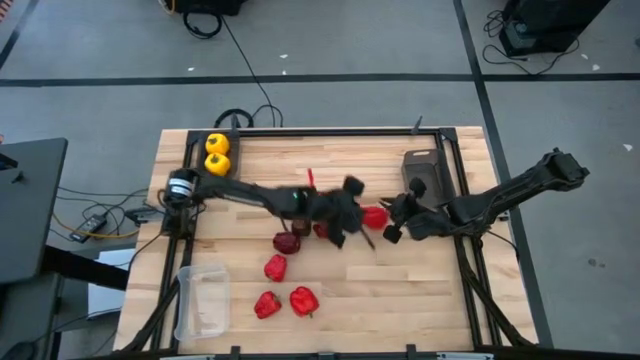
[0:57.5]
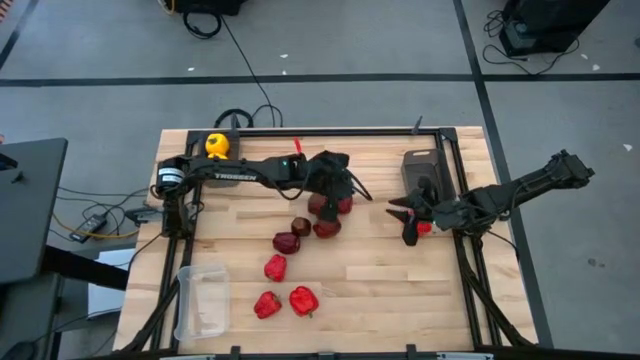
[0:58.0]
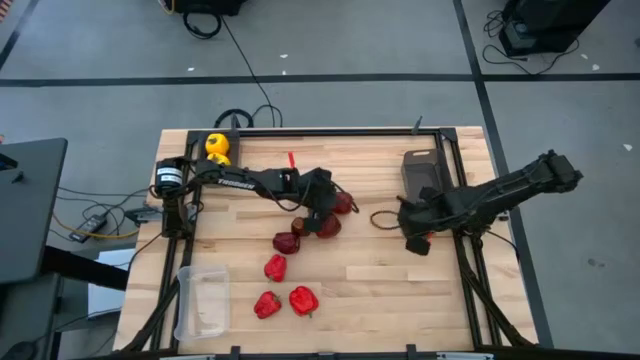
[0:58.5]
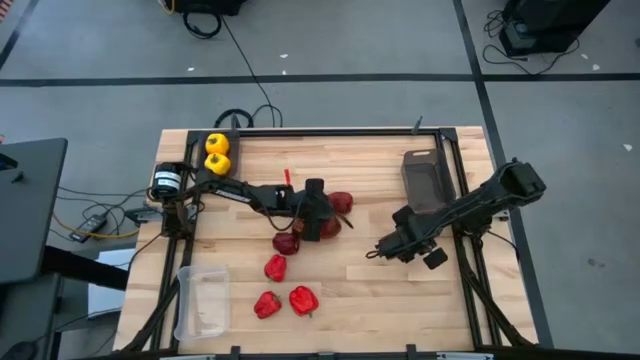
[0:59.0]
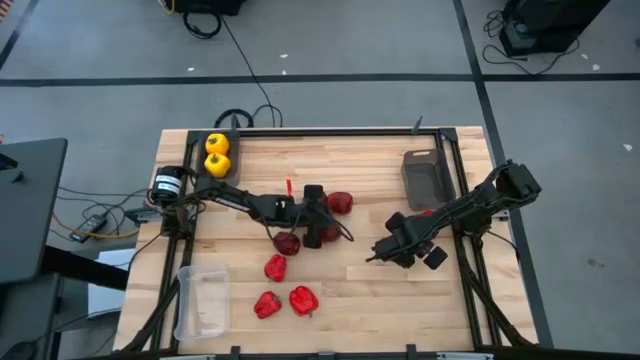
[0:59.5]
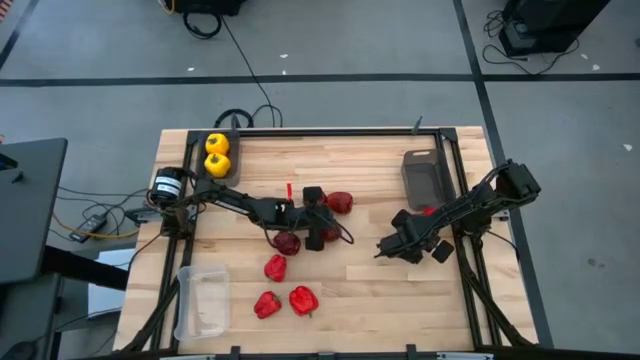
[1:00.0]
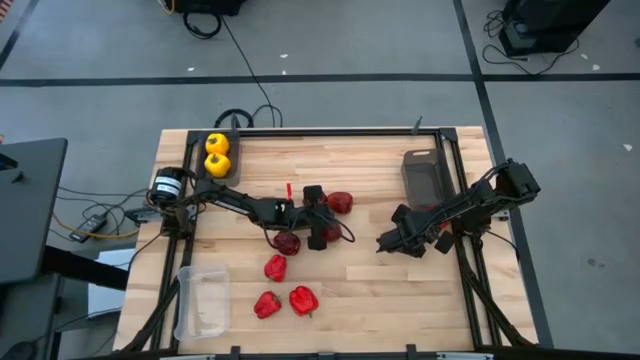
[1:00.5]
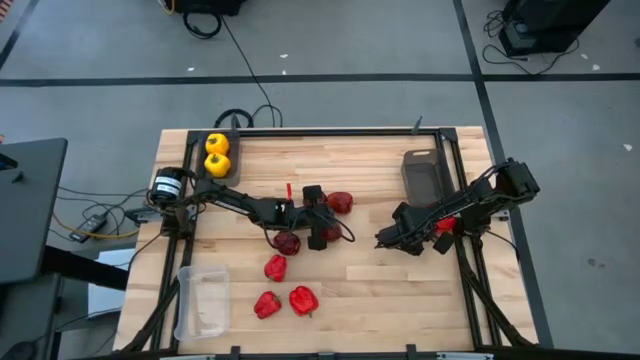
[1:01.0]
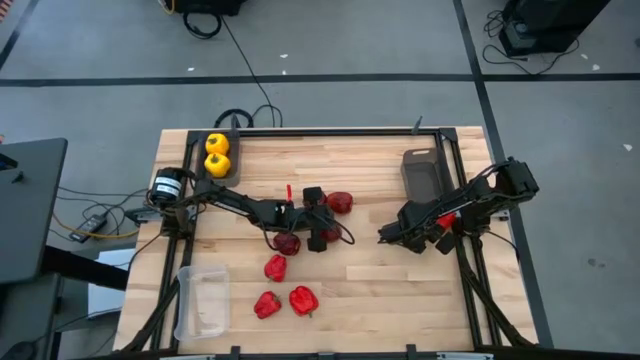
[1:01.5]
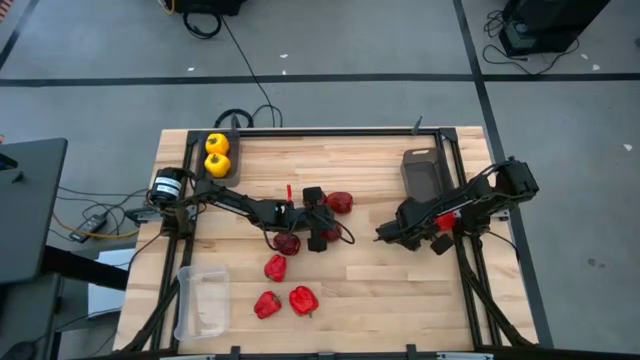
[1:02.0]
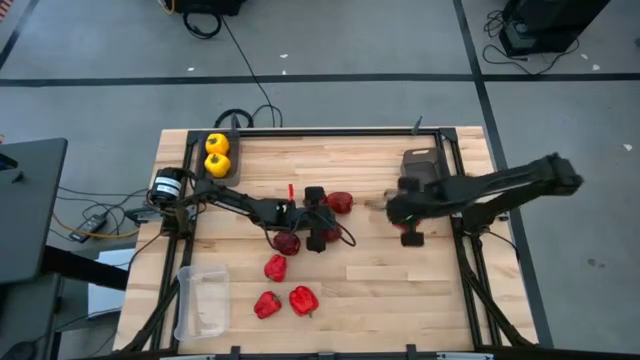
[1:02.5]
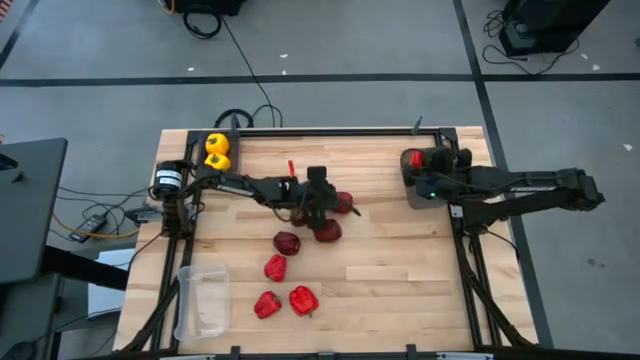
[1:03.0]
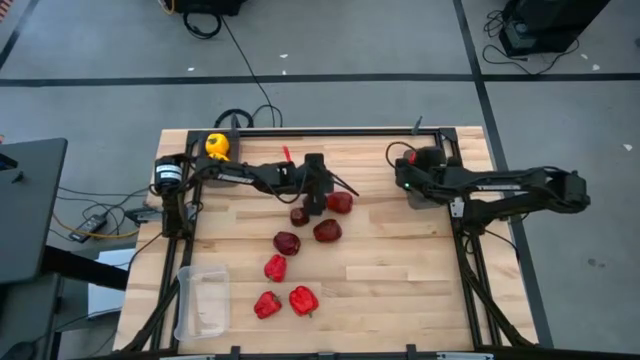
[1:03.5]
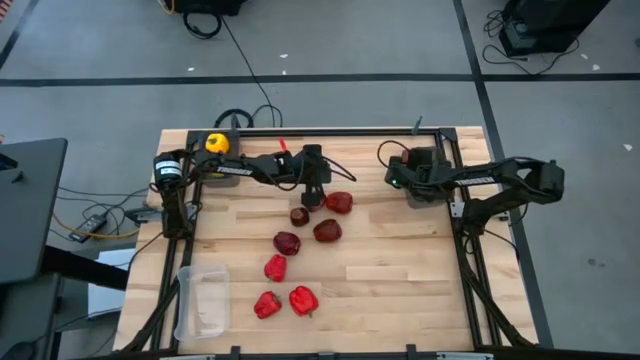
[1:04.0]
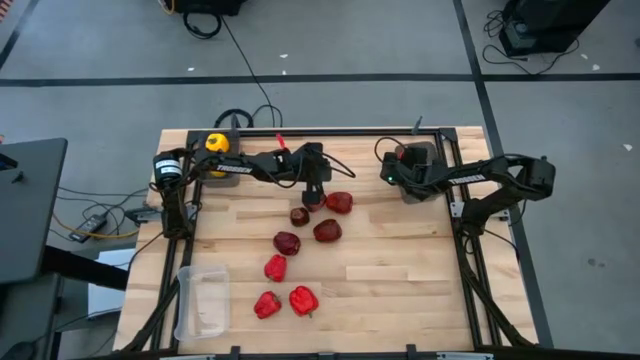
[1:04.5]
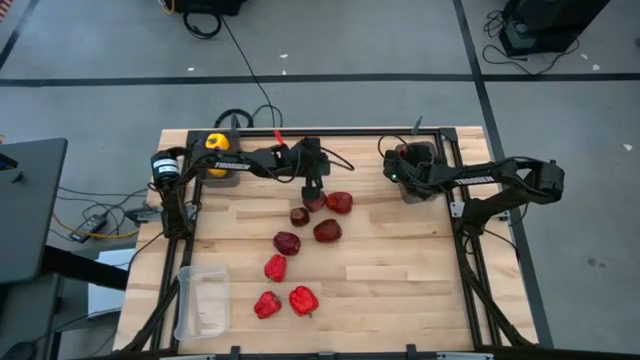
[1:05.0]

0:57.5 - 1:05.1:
Task: Sort produce into baskets
Put the red bell pepper into the right black transparent bin

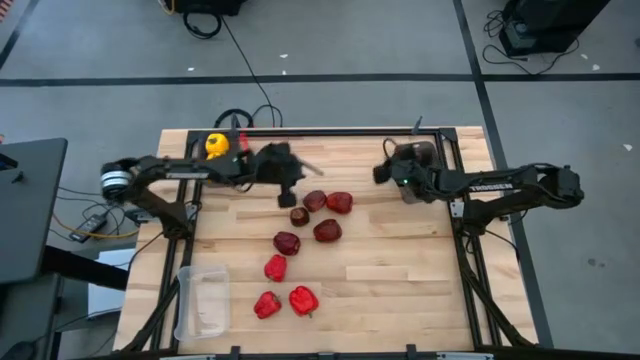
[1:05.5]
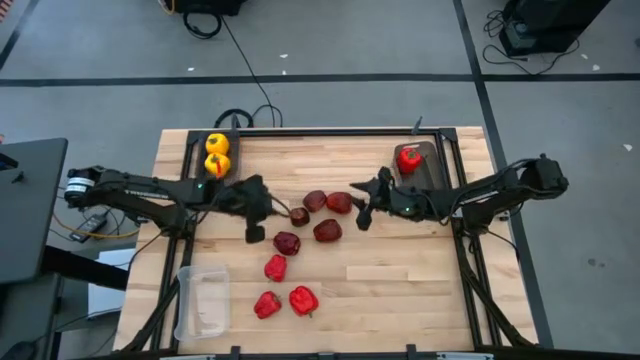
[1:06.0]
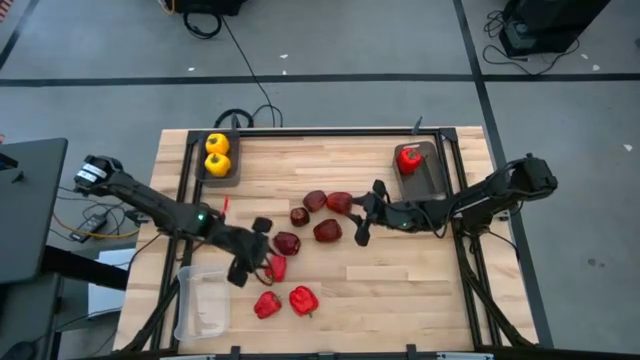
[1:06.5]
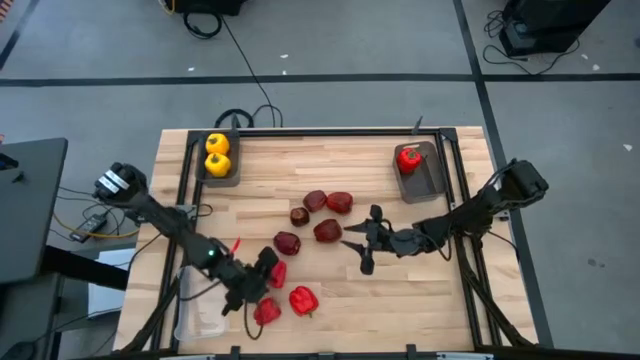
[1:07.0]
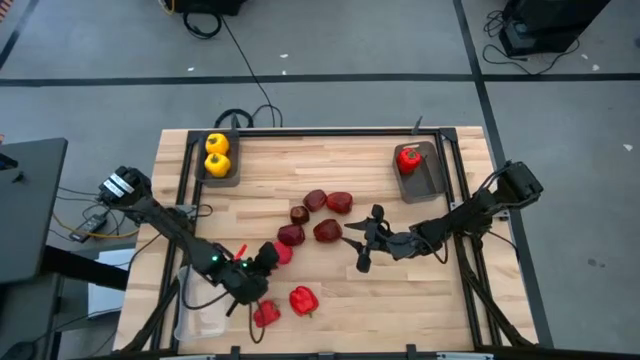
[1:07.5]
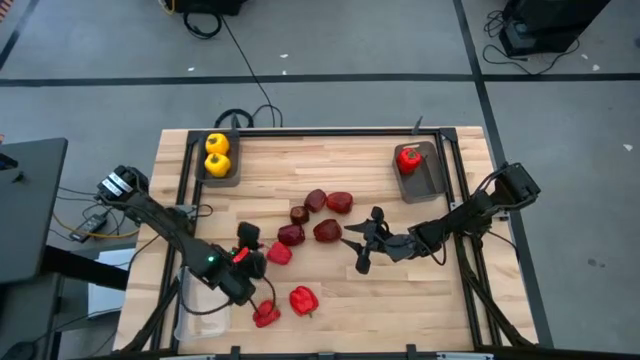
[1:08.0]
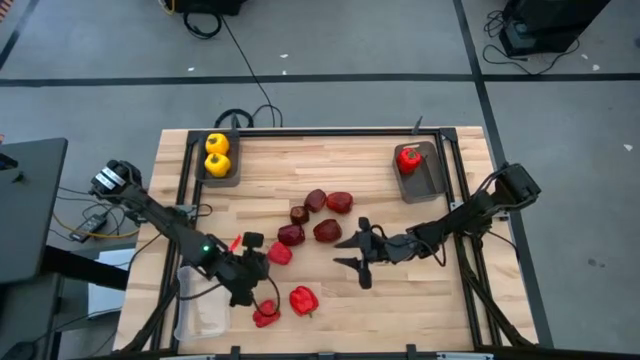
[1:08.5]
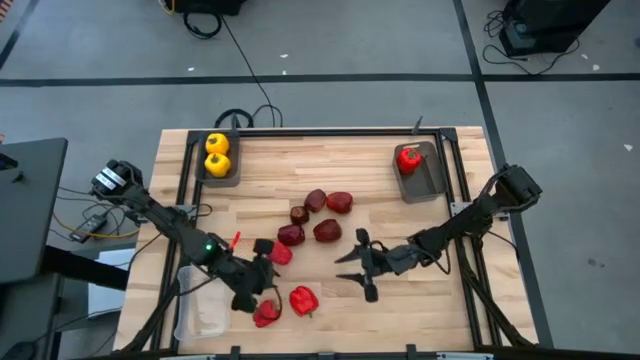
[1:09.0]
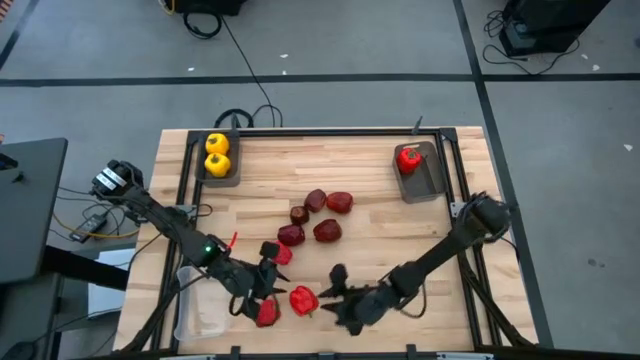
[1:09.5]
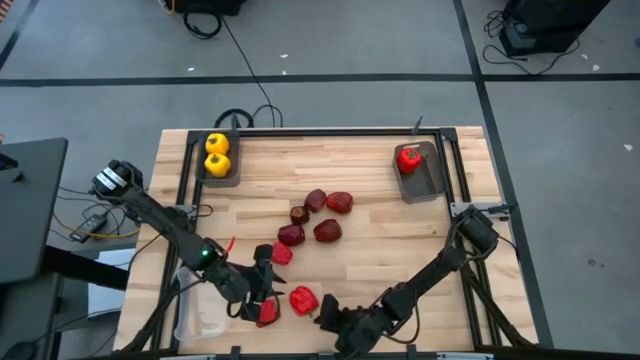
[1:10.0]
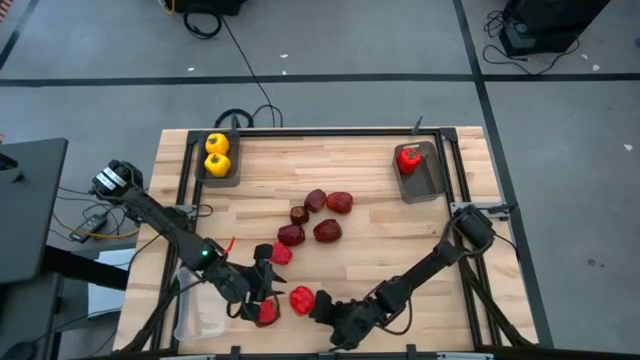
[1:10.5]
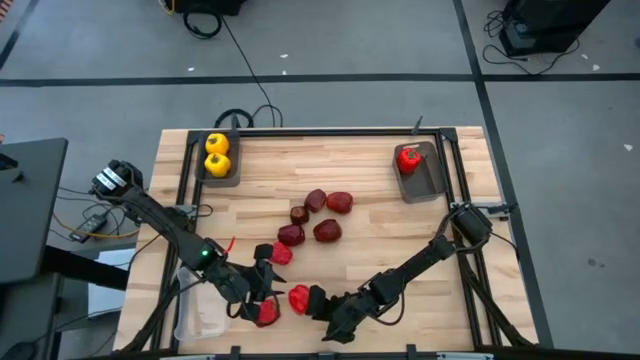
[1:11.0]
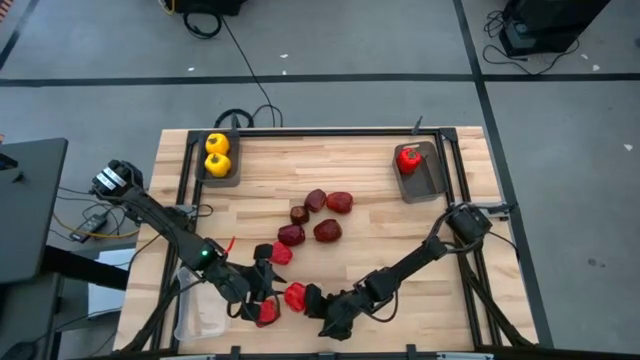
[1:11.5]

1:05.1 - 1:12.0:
Put the red bell pepper into the right black transparent bin

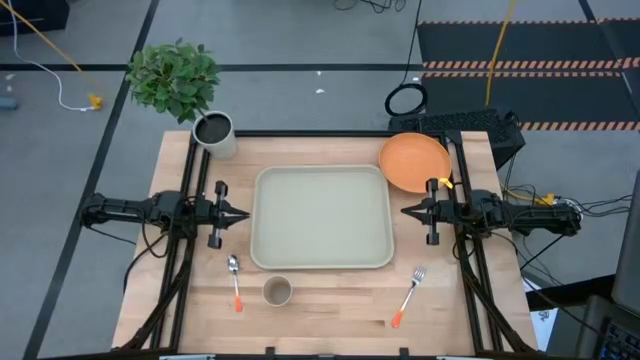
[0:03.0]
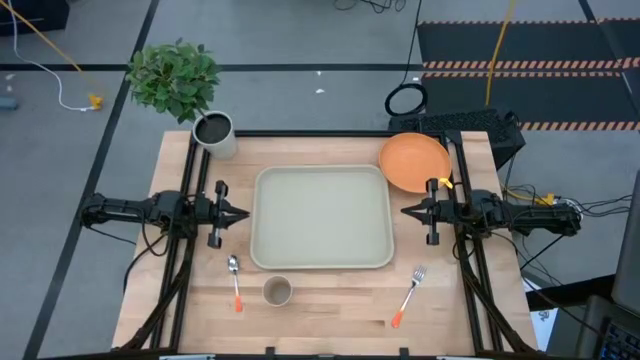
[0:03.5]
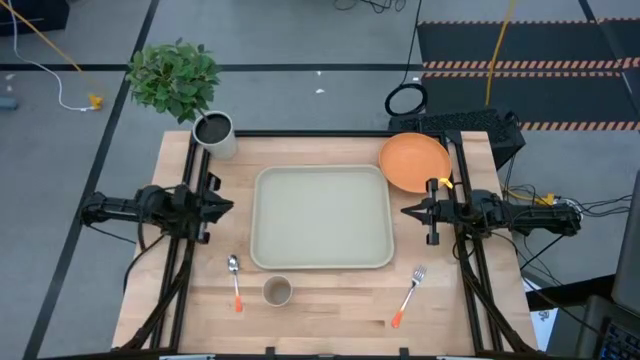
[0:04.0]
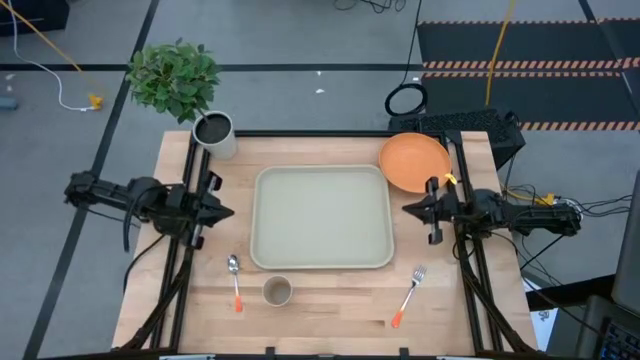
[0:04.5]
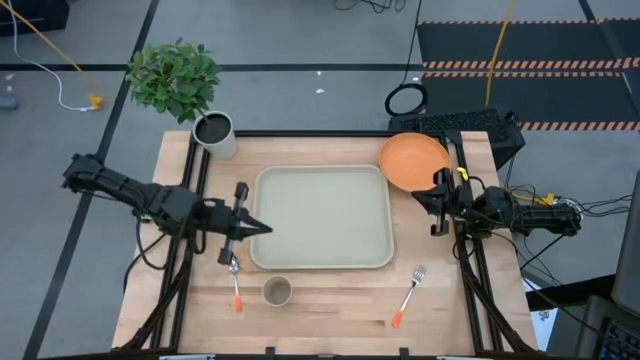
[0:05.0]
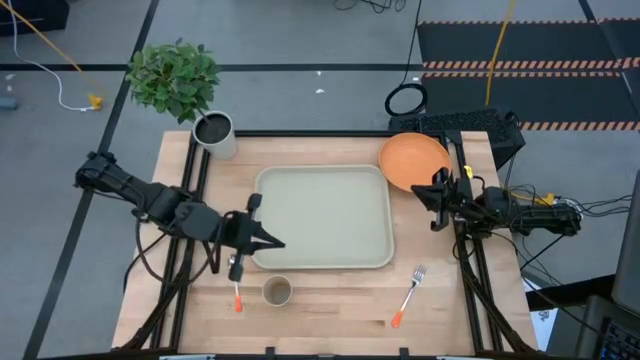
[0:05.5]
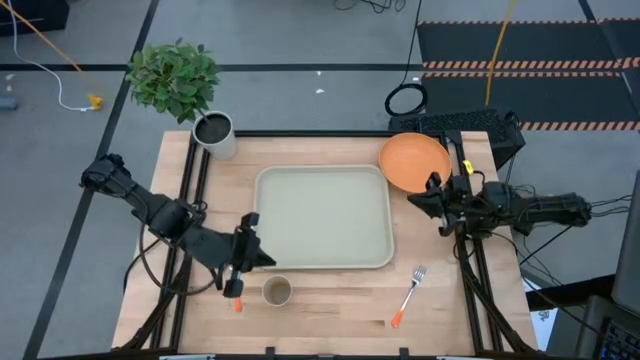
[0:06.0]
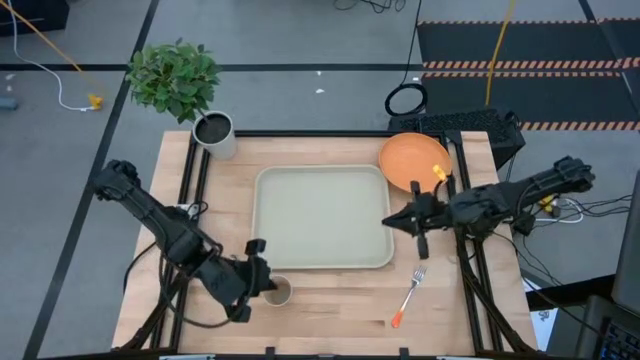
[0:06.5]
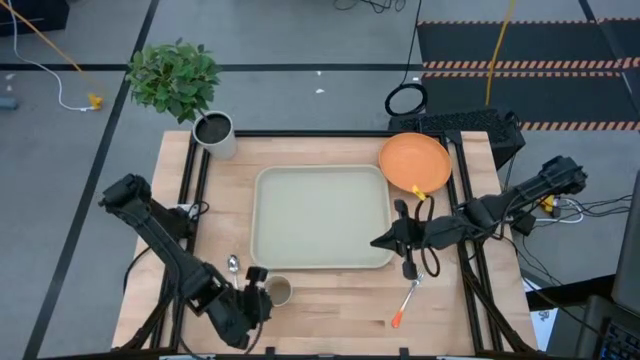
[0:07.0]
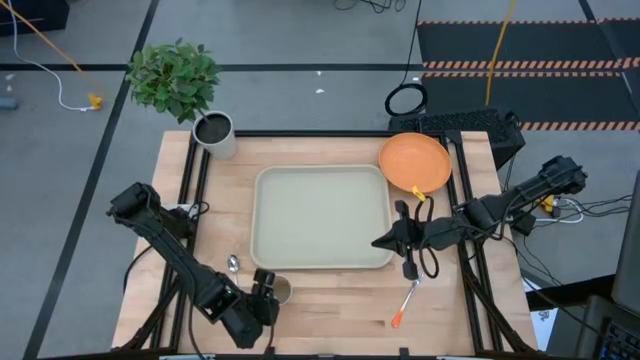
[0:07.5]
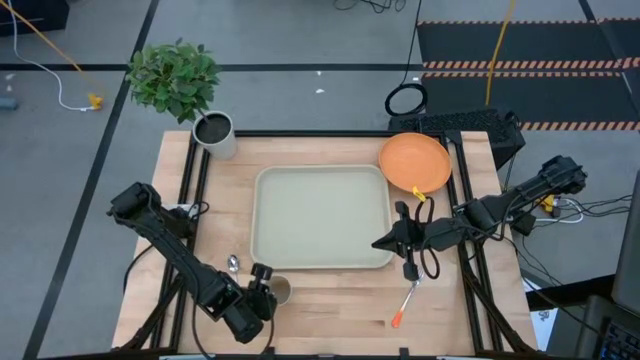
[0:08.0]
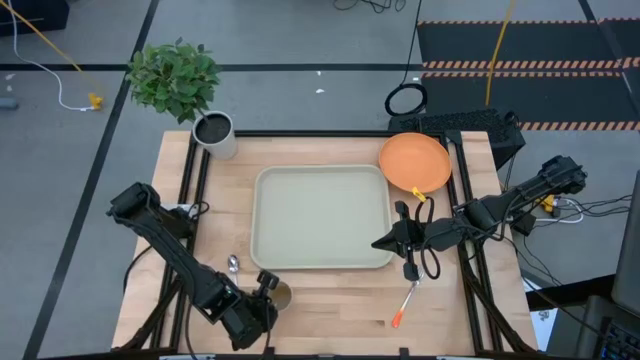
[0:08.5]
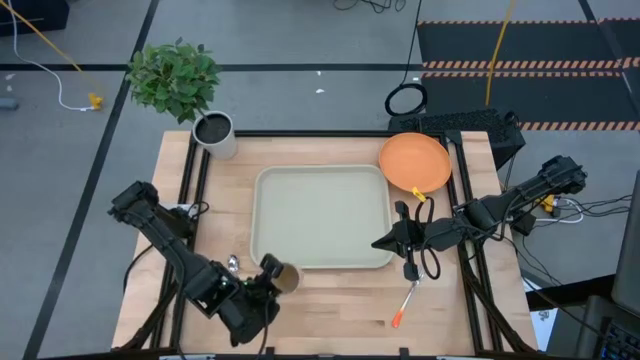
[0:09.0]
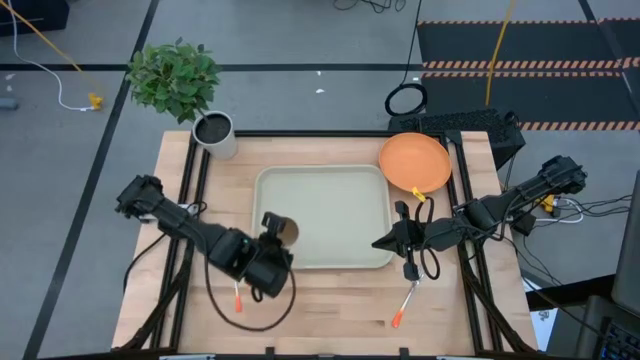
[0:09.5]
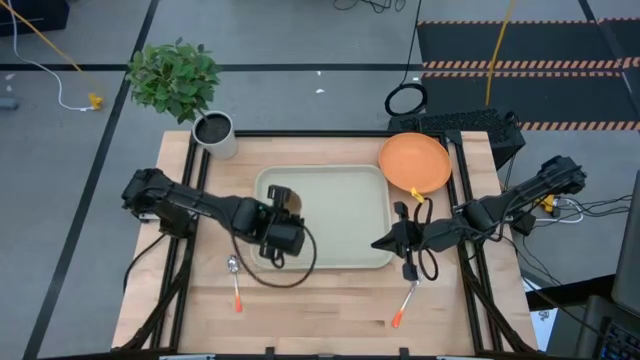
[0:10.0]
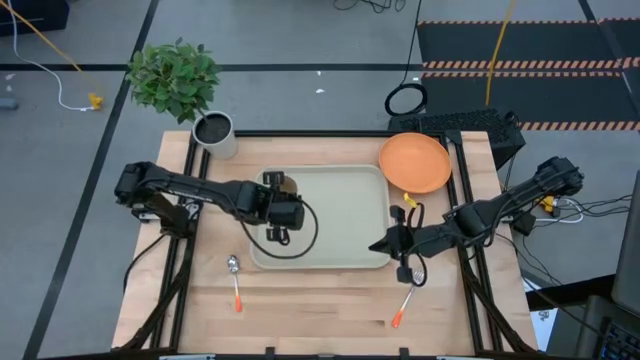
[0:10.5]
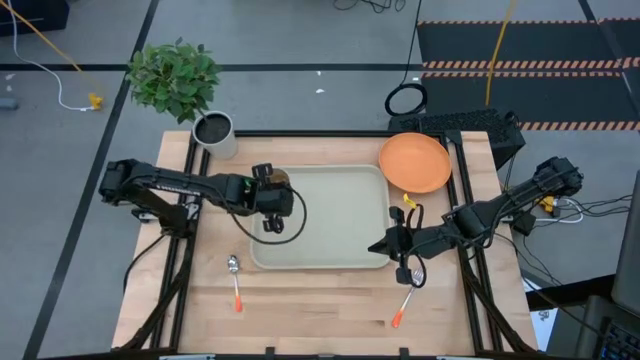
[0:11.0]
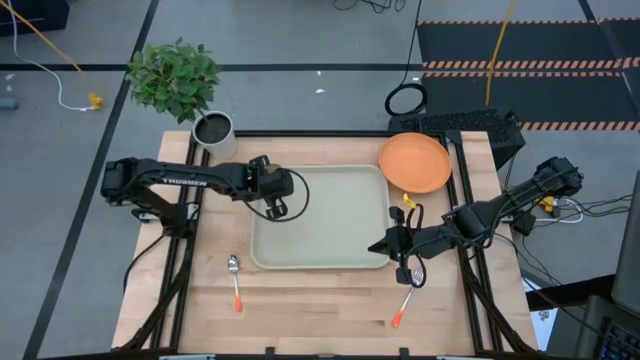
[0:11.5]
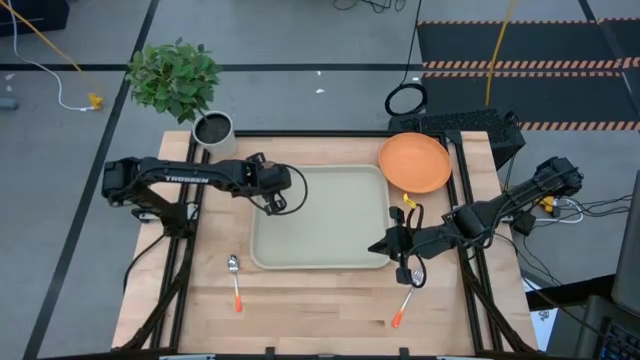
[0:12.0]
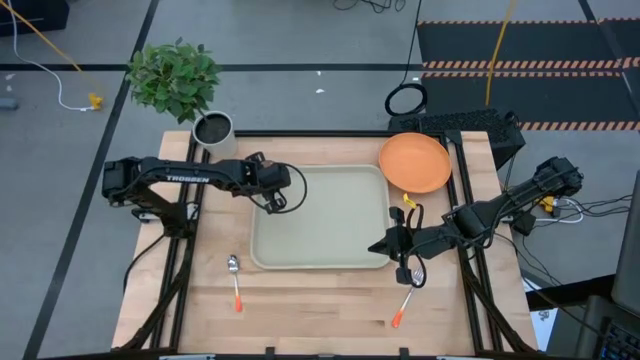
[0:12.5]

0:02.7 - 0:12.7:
Task: Pick and place plate/cup/fork/spoon on tray
Put the white cup on the white serving tray
